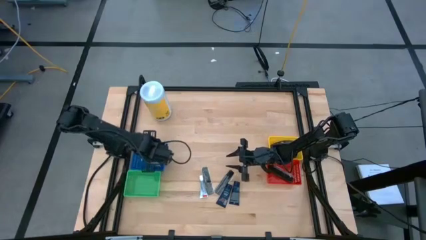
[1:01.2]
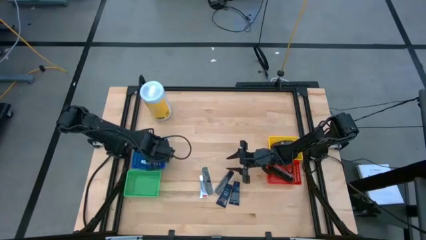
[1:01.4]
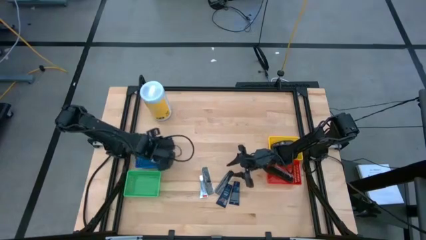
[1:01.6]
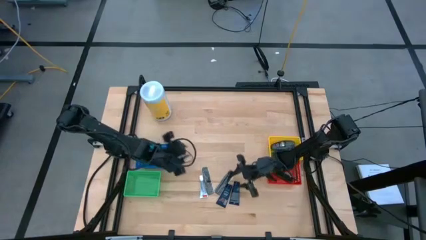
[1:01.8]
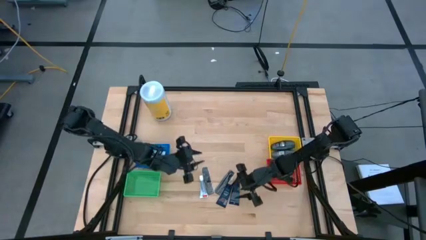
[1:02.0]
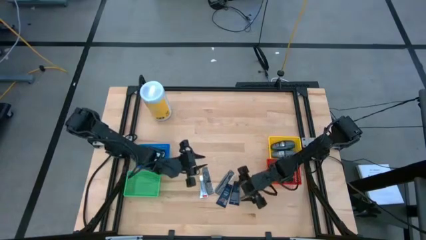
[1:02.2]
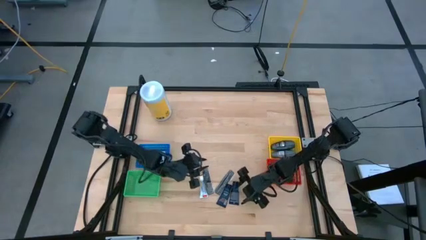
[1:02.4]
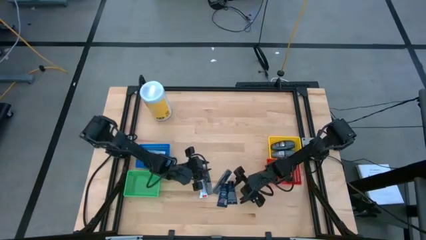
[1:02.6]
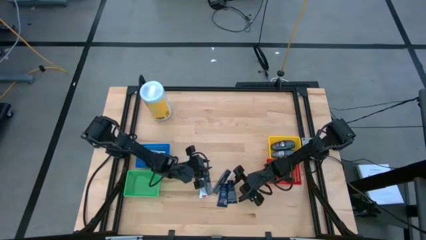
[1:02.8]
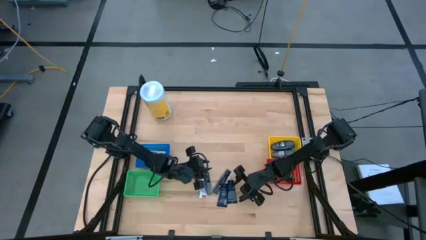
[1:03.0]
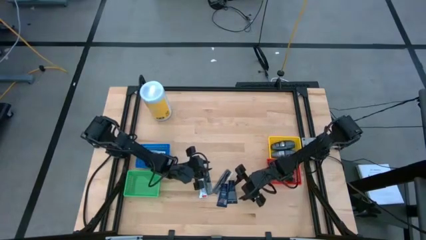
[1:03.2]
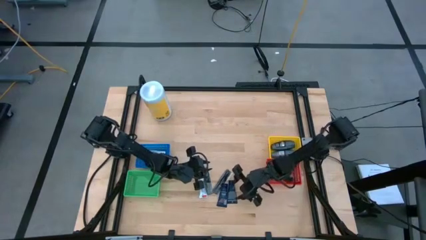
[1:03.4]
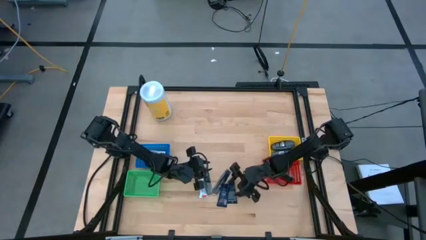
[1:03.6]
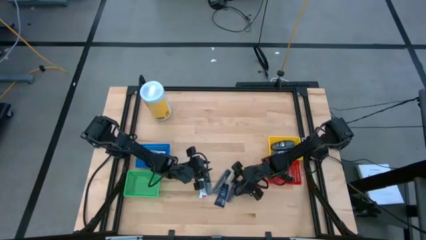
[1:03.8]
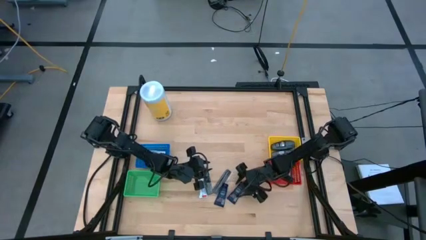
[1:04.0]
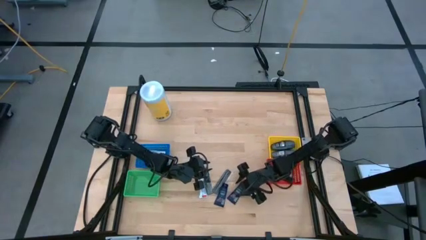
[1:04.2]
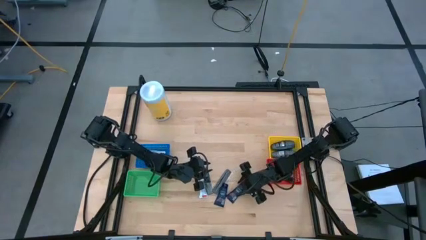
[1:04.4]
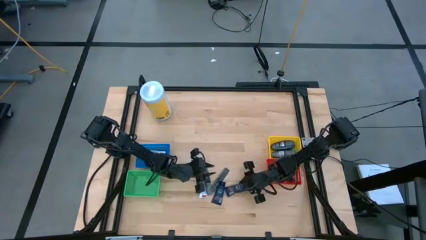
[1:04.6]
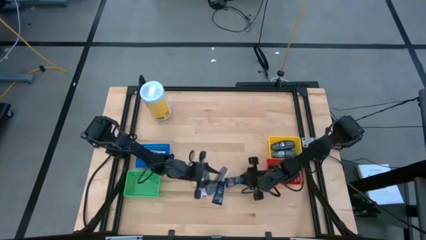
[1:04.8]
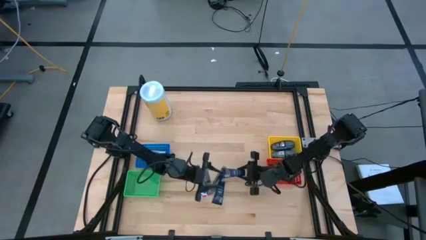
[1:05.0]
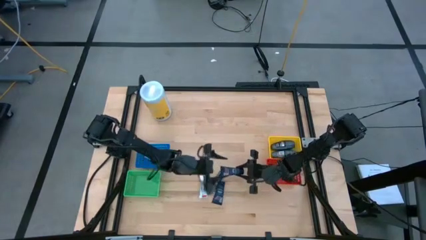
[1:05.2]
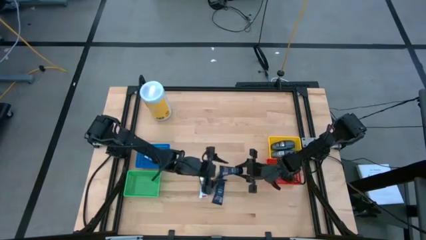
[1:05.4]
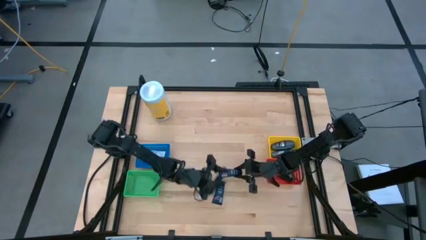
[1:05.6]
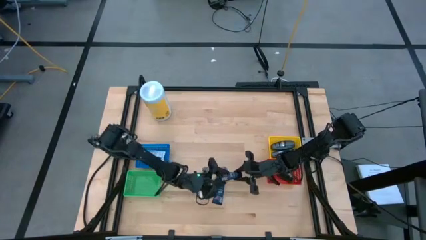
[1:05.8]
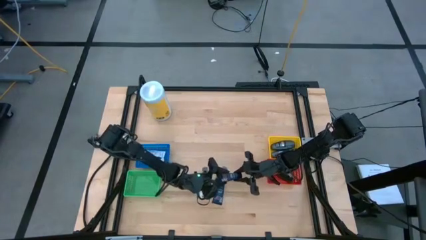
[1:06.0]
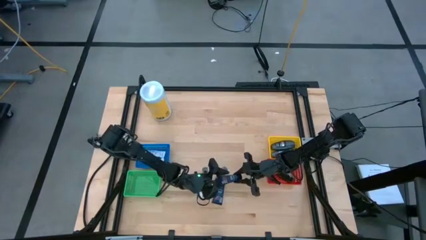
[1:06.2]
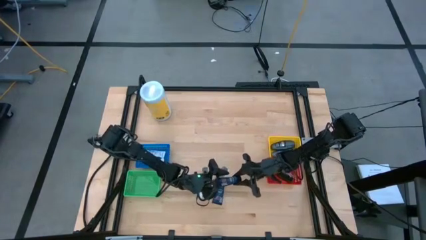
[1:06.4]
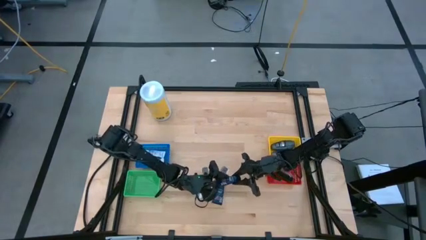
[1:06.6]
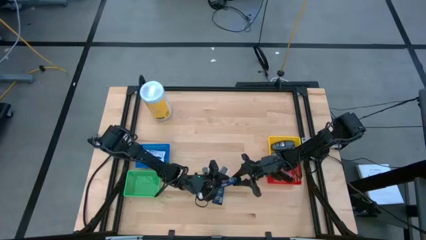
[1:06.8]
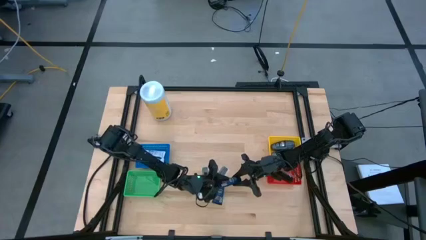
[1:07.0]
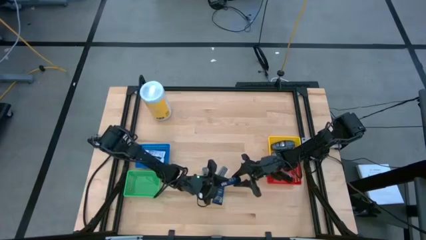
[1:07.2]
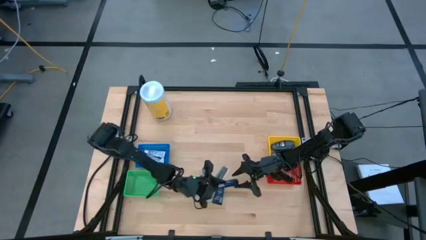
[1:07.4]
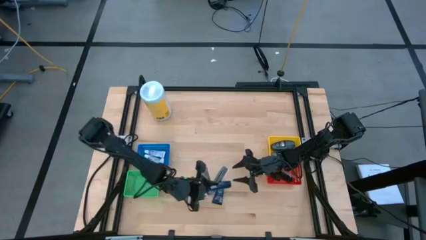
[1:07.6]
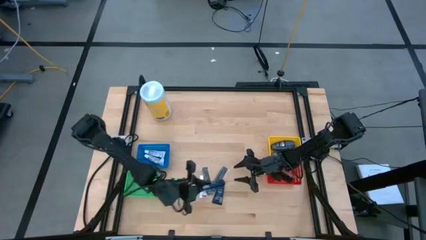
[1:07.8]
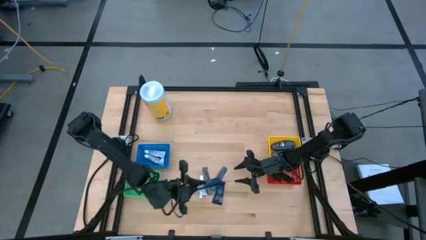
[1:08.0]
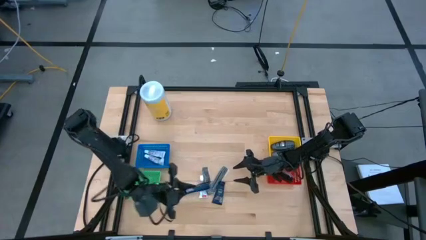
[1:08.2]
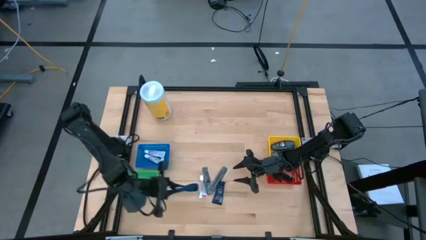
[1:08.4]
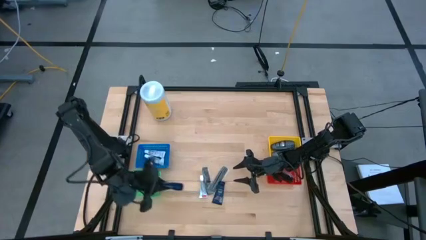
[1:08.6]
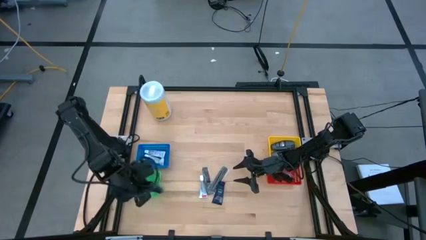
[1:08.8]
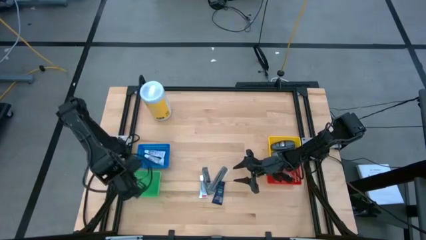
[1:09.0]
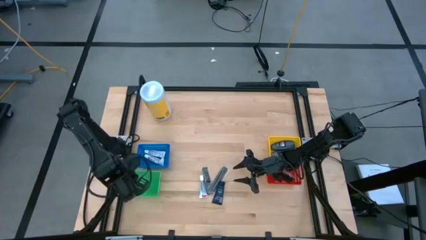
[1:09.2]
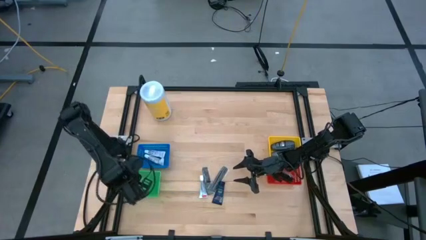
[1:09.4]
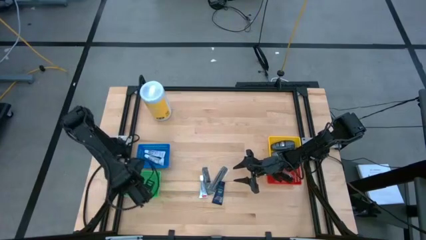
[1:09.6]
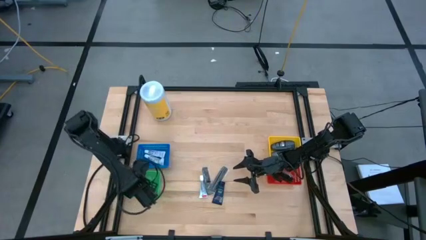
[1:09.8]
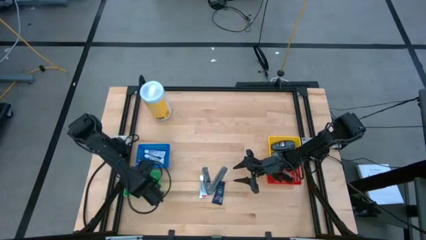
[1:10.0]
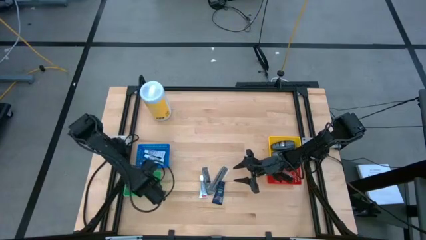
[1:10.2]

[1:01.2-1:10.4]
Task: Pick & Place Travel size toiletries
Put the blue shave cream into the green basket

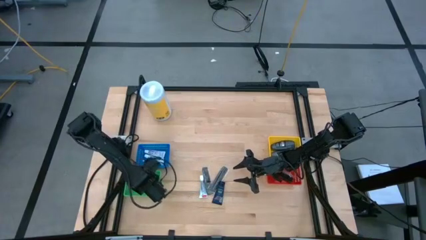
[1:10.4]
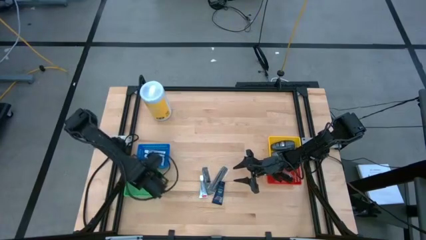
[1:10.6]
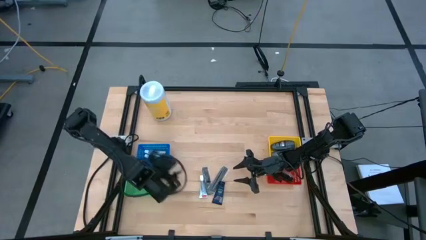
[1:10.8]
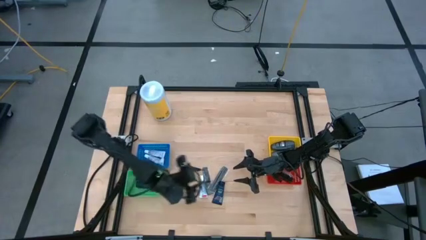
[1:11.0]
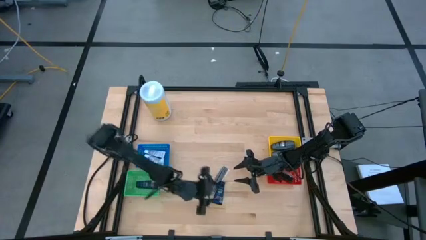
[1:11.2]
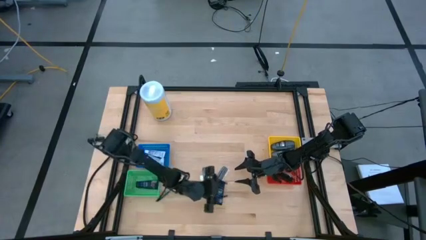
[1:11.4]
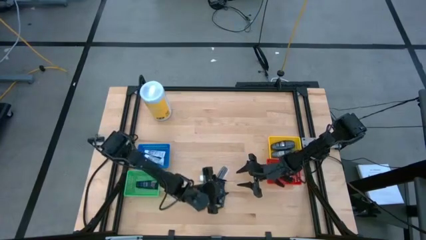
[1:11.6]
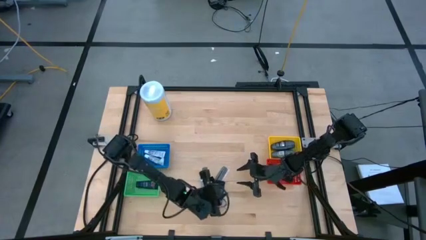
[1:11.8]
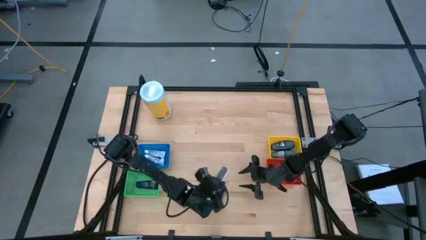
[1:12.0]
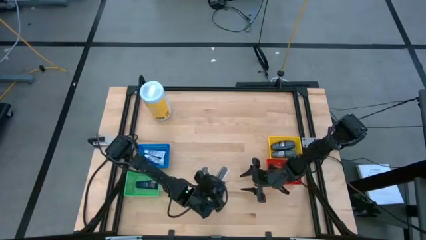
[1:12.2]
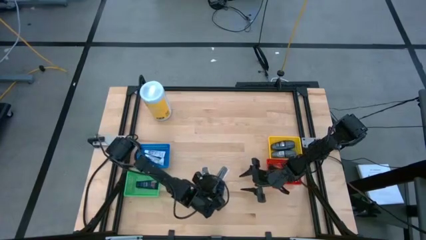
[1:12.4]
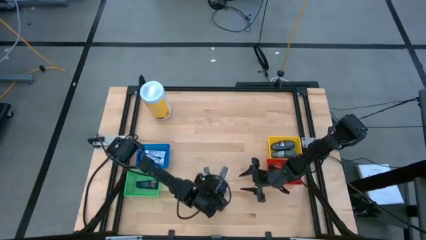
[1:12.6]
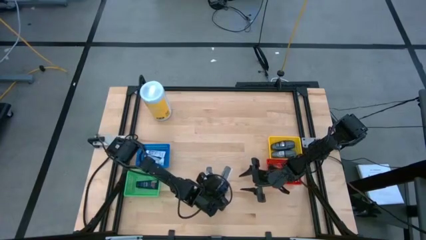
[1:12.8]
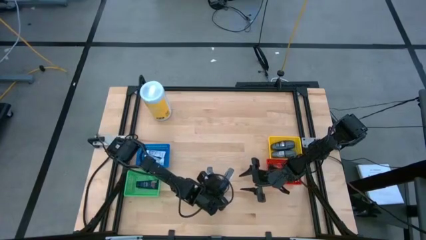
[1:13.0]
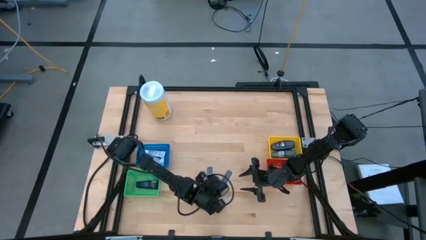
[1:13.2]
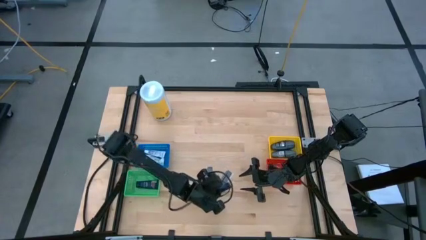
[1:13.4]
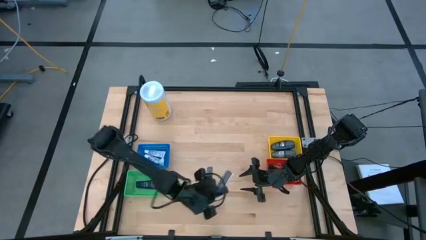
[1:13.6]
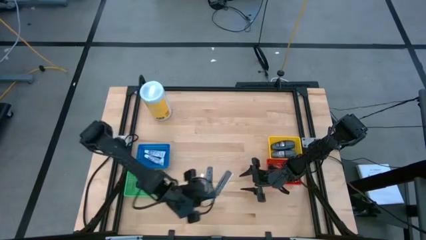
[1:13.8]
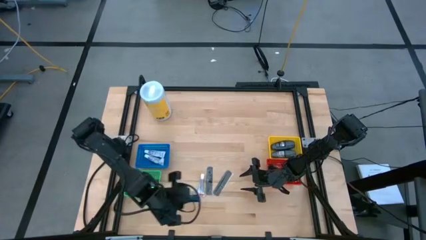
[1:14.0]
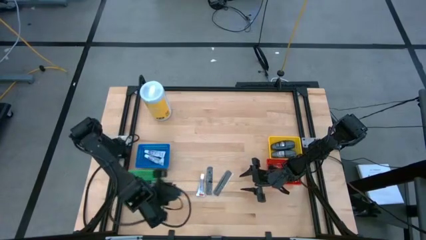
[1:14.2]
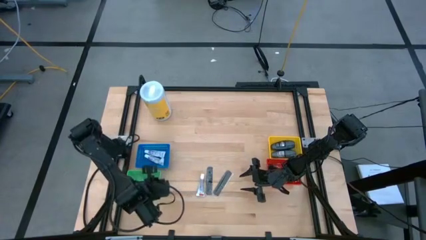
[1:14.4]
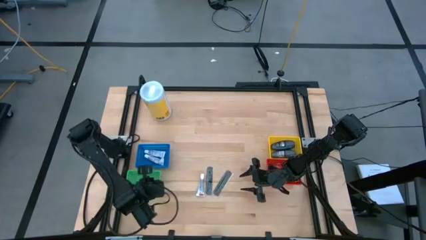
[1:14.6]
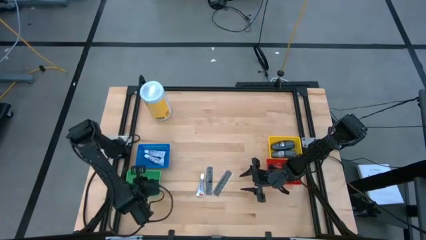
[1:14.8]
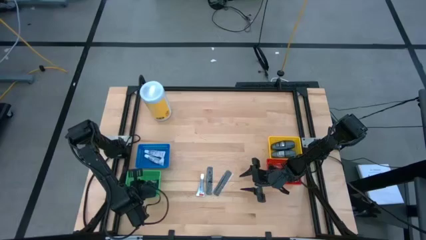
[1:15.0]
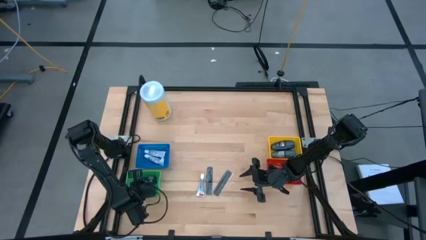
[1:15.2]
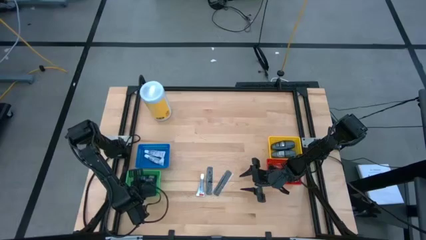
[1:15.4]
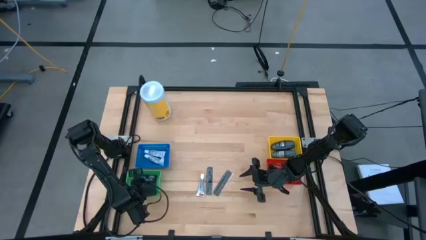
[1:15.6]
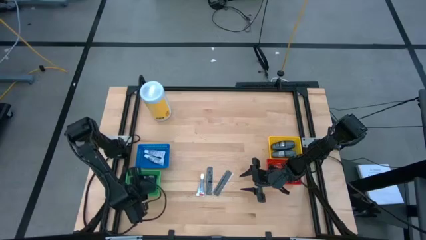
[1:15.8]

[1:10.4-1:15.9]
Put the blue shave cream into the green basket

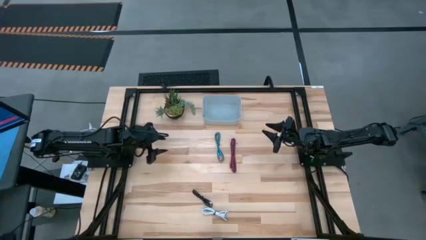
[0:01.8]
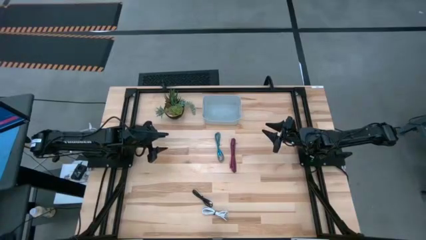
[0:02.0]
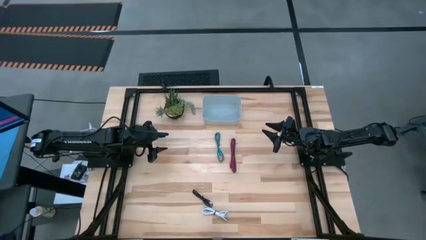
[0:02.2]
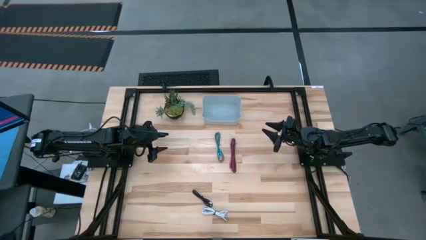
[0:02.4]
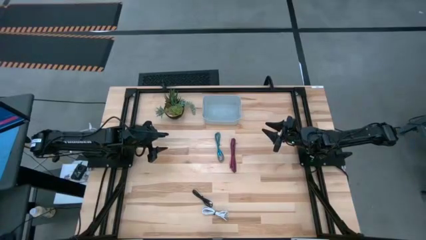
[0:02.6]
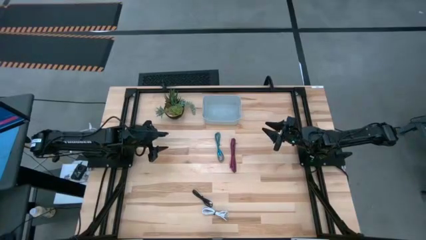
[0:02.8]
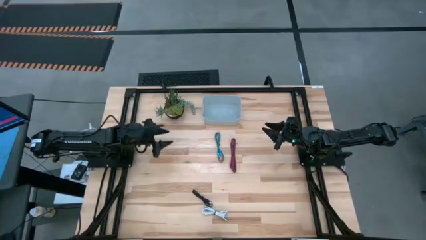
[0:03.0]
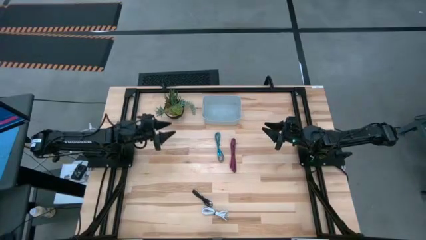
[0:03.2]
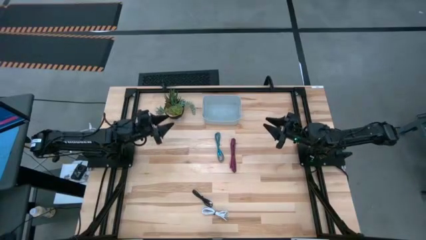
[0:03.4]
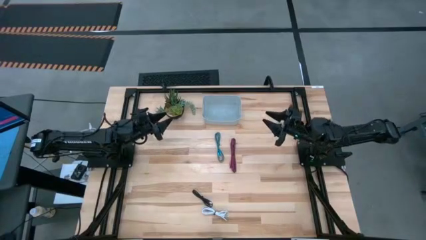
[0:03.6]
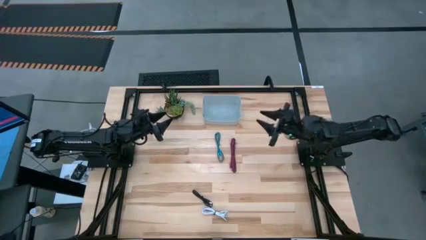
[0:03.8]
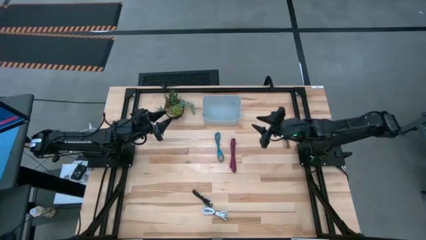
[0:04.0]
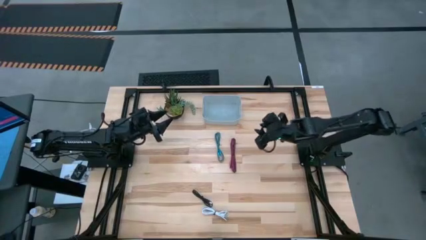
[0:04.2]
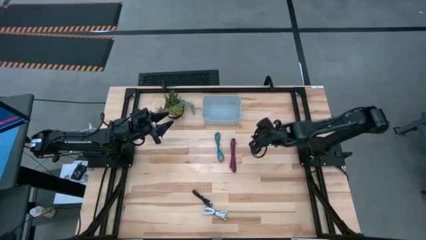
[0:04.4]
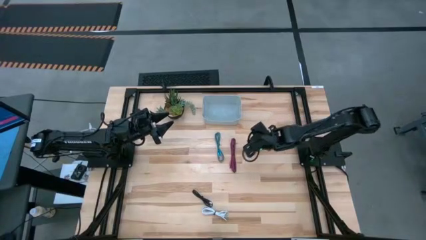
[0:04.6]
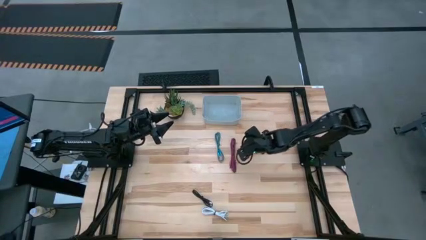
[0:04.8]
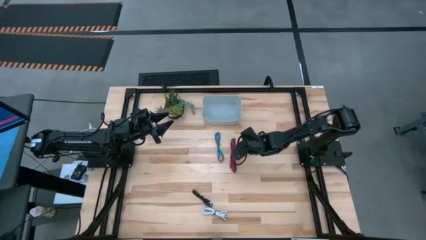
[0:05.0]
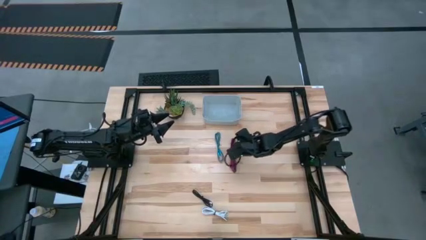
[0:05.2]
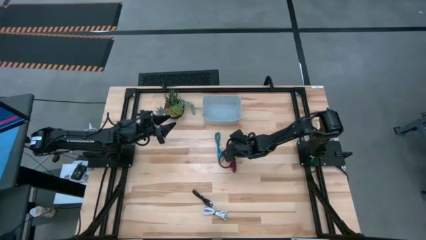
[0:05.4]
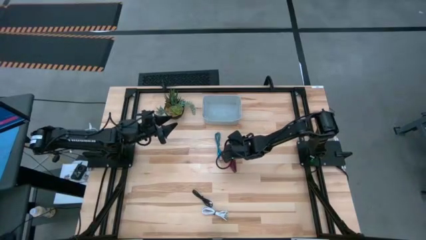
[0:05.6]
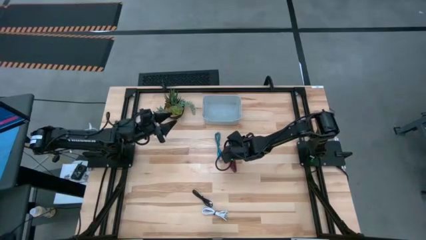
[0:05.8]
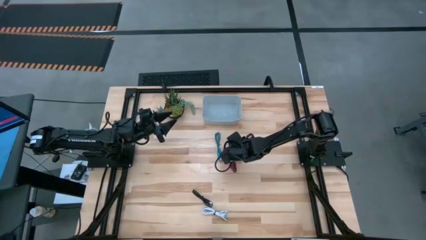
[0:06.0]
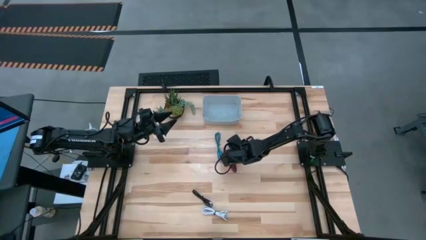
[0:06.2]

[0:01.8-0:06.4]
Task: Pick and place USB-C Cables
Put the red charger cable into the white bin
